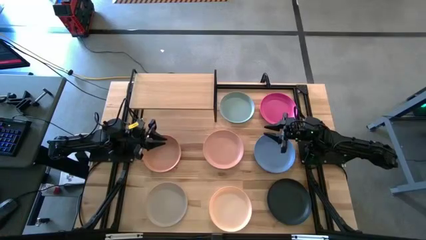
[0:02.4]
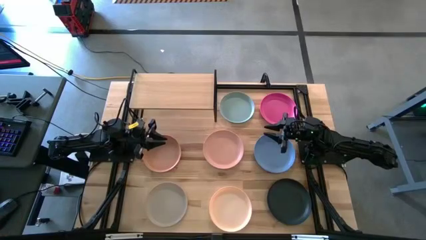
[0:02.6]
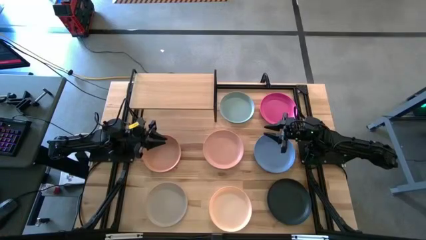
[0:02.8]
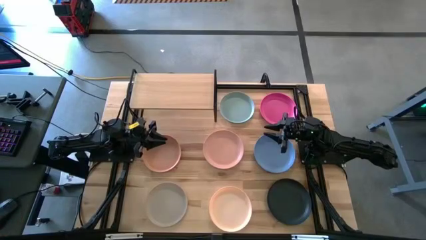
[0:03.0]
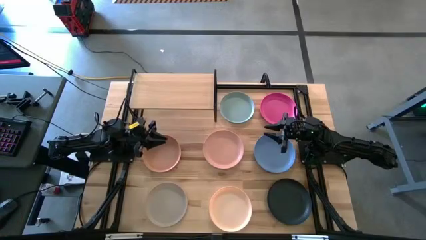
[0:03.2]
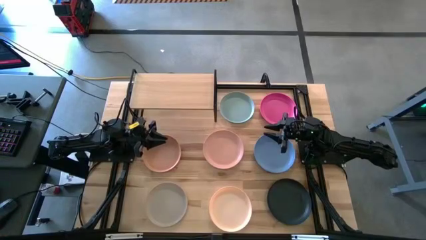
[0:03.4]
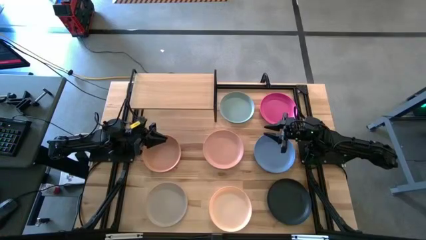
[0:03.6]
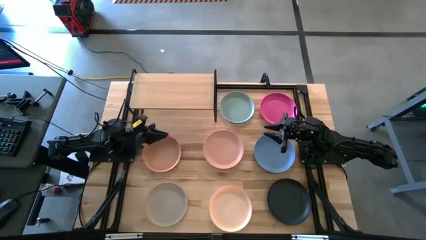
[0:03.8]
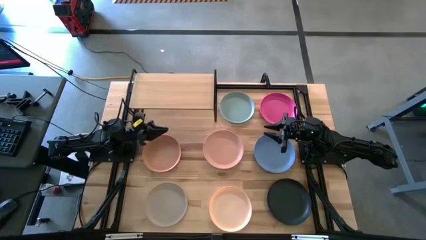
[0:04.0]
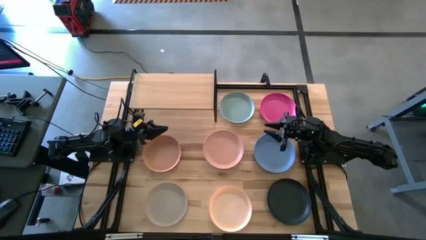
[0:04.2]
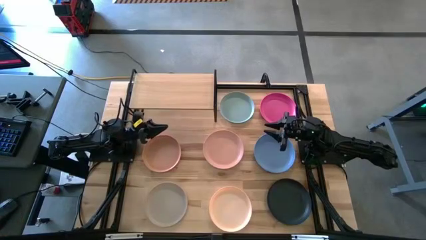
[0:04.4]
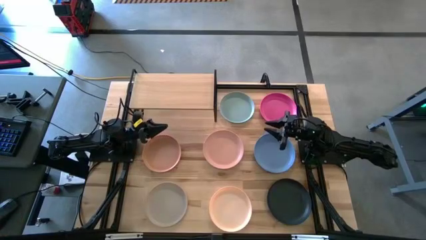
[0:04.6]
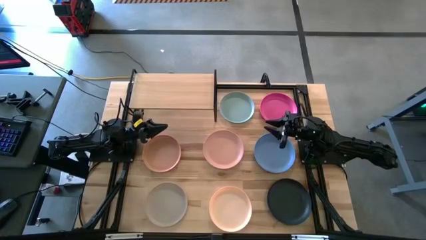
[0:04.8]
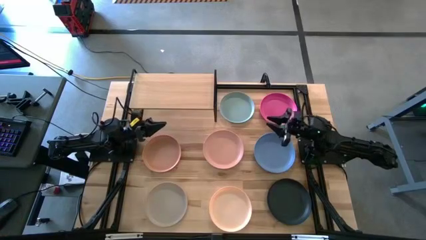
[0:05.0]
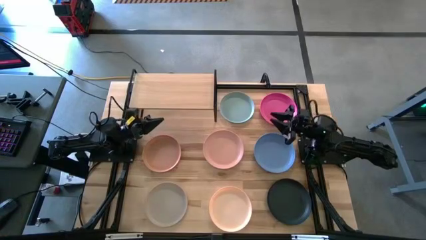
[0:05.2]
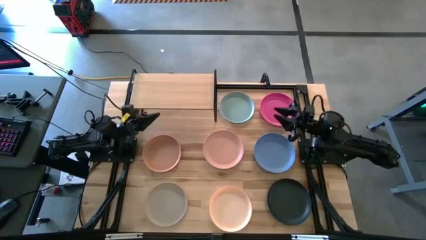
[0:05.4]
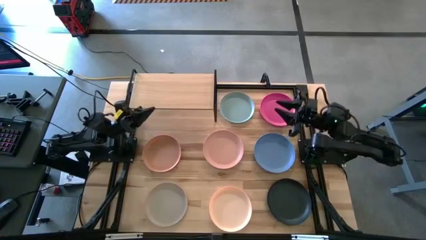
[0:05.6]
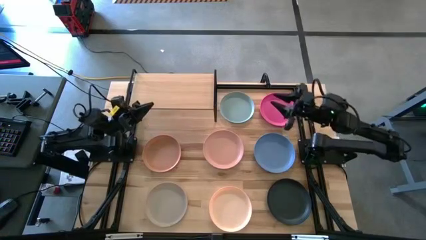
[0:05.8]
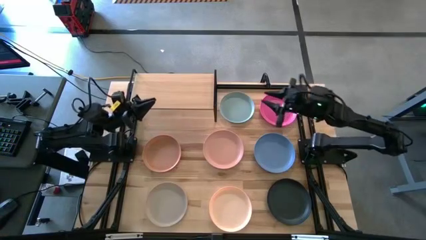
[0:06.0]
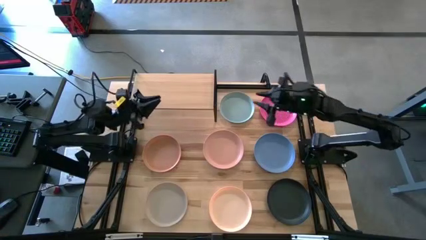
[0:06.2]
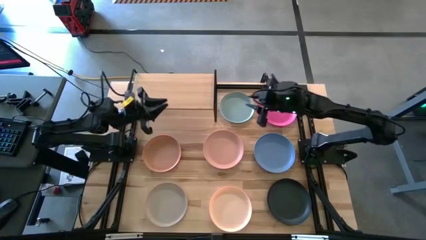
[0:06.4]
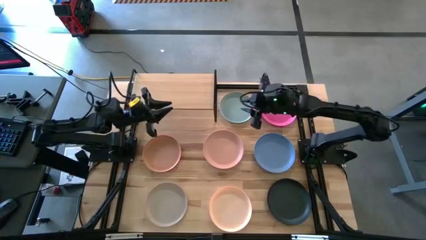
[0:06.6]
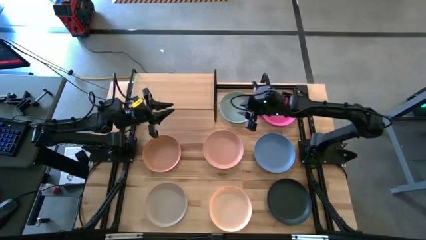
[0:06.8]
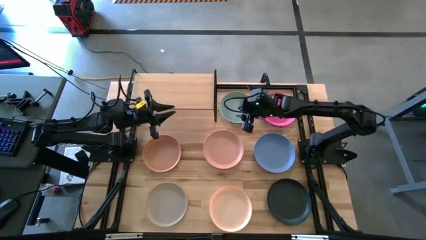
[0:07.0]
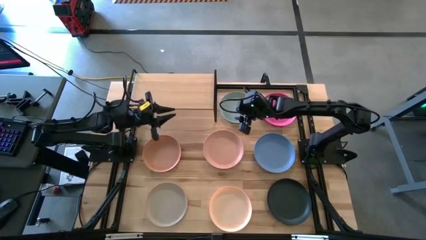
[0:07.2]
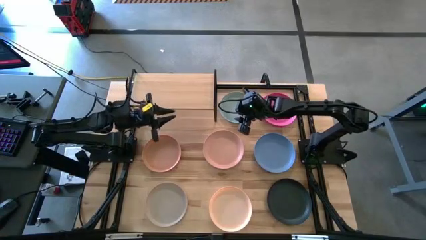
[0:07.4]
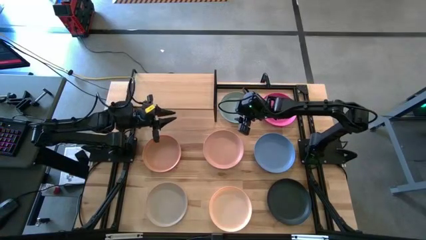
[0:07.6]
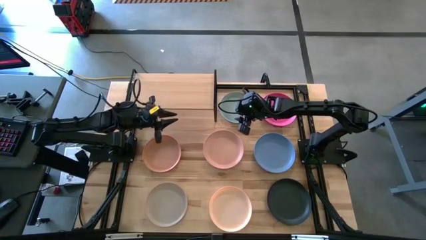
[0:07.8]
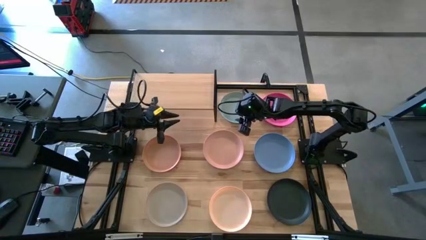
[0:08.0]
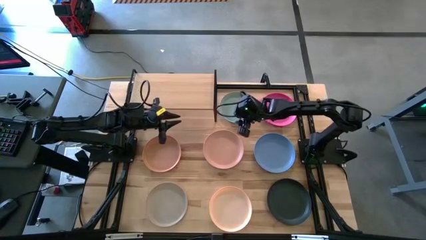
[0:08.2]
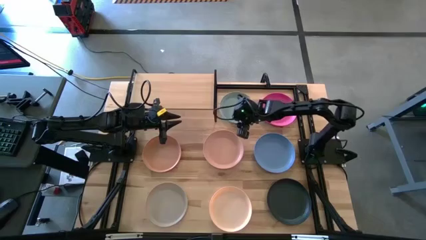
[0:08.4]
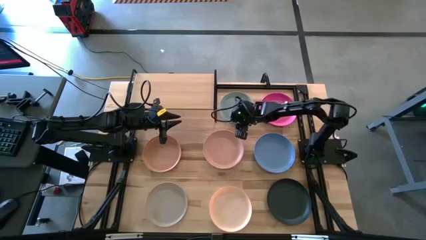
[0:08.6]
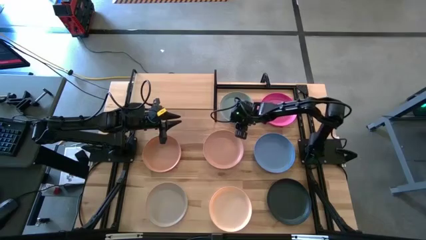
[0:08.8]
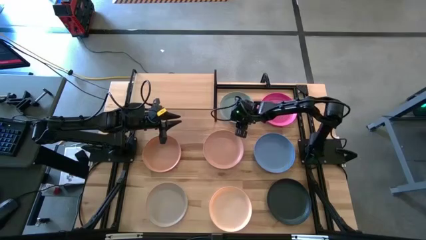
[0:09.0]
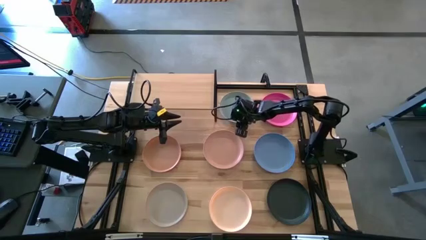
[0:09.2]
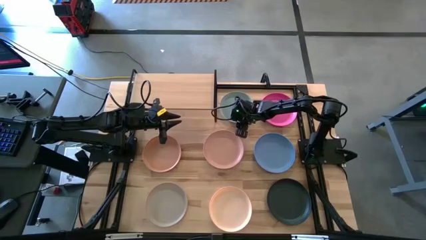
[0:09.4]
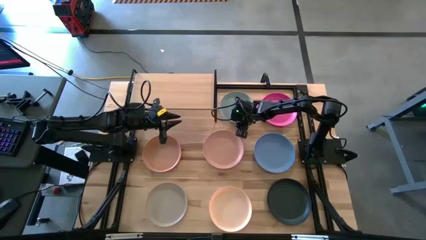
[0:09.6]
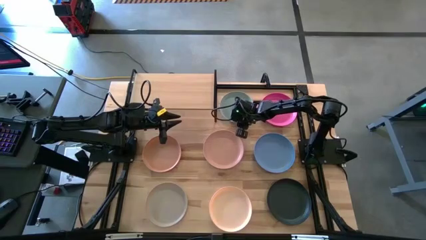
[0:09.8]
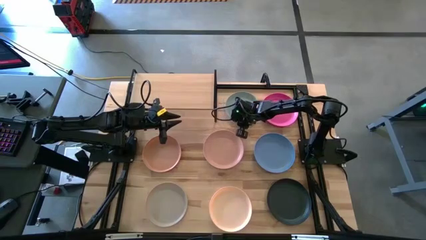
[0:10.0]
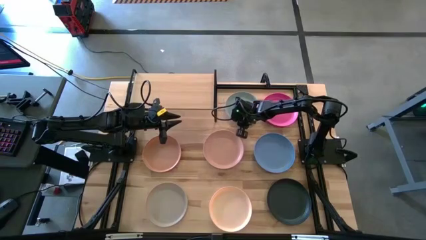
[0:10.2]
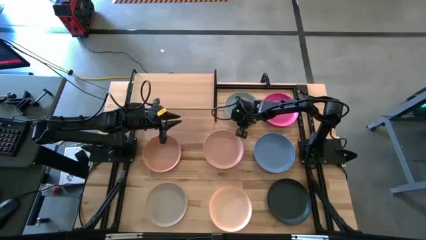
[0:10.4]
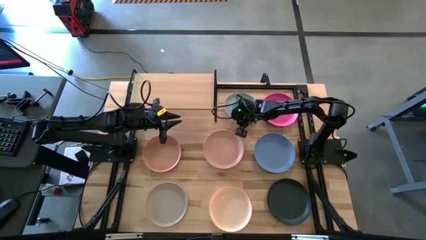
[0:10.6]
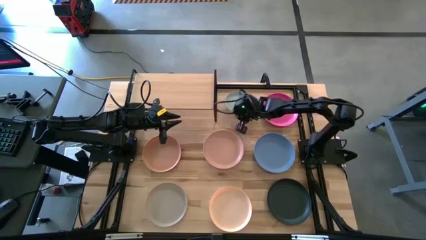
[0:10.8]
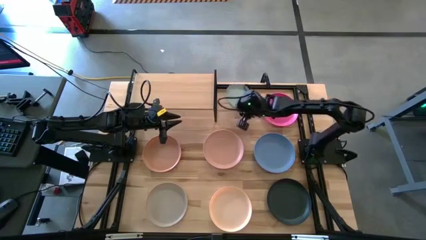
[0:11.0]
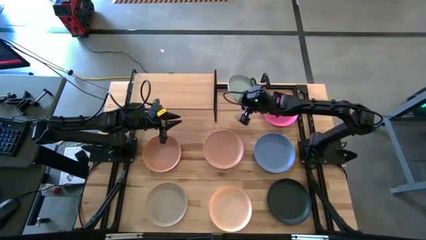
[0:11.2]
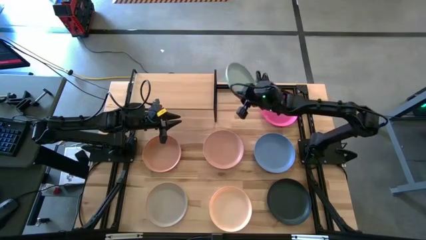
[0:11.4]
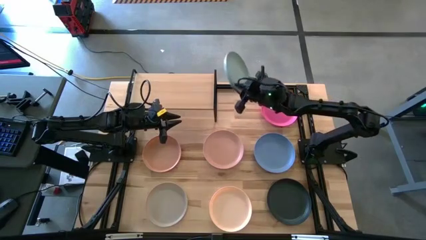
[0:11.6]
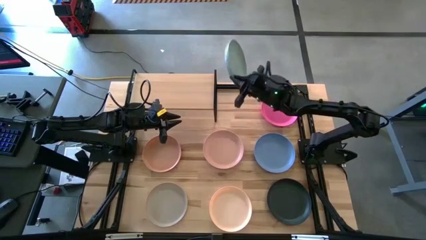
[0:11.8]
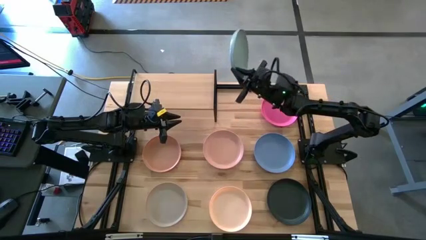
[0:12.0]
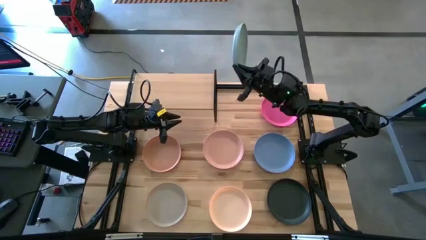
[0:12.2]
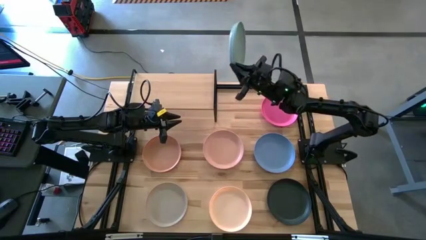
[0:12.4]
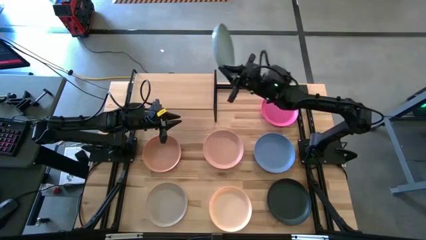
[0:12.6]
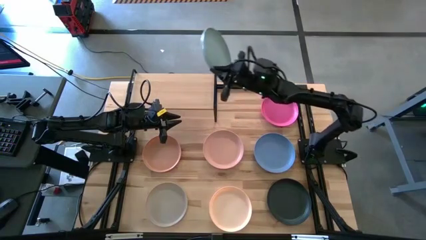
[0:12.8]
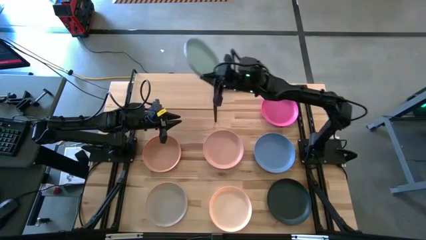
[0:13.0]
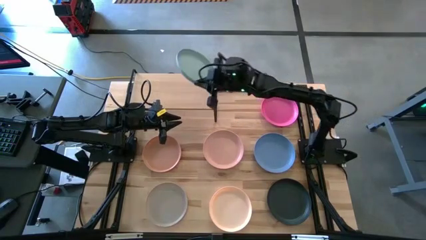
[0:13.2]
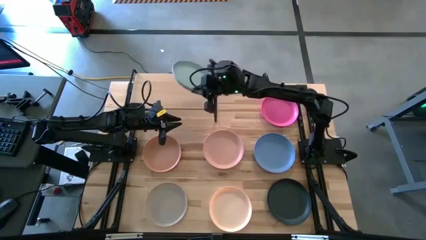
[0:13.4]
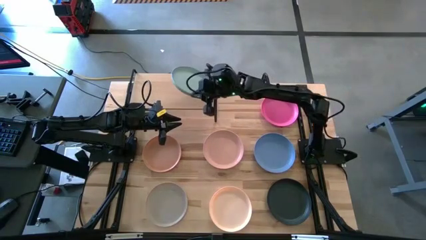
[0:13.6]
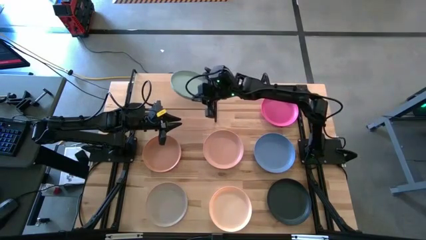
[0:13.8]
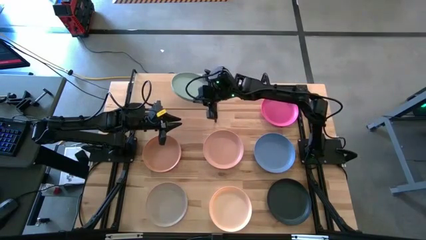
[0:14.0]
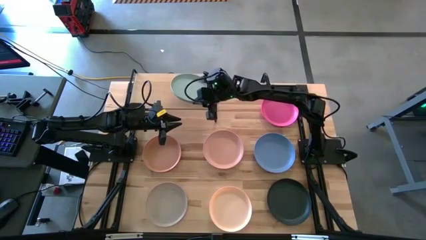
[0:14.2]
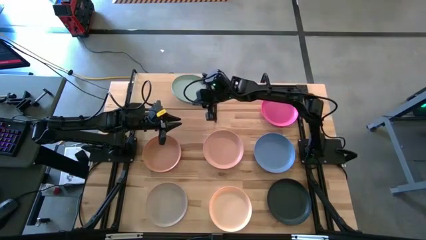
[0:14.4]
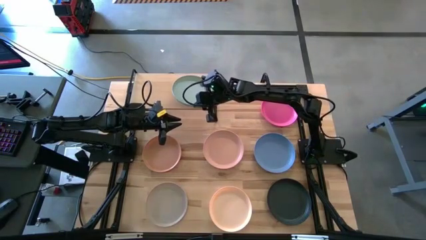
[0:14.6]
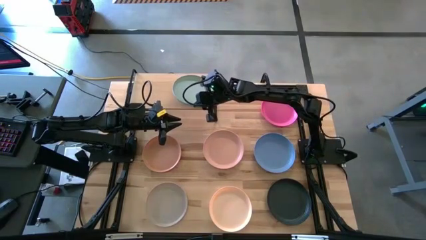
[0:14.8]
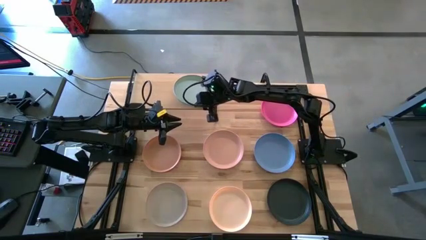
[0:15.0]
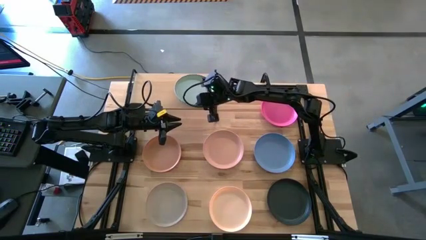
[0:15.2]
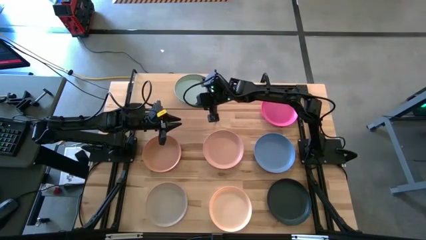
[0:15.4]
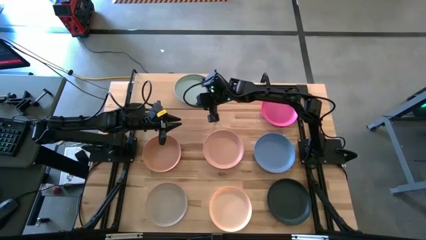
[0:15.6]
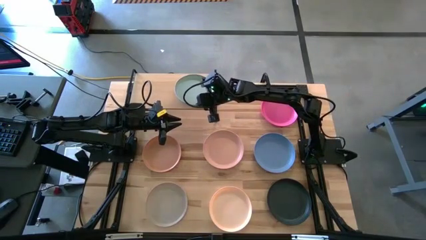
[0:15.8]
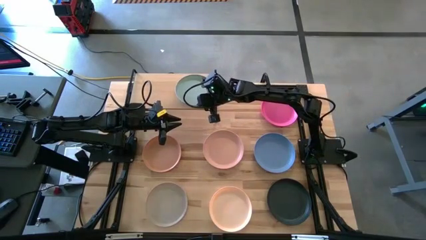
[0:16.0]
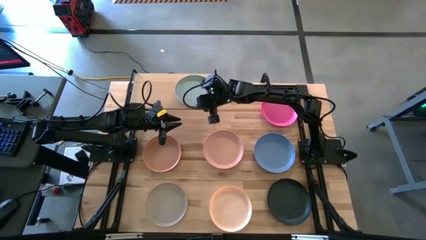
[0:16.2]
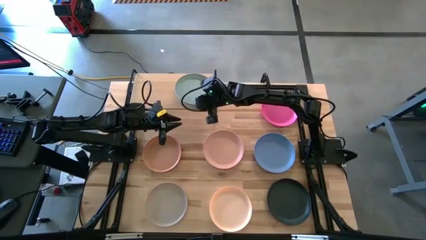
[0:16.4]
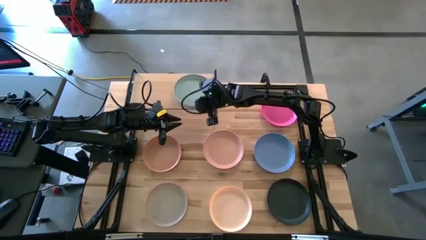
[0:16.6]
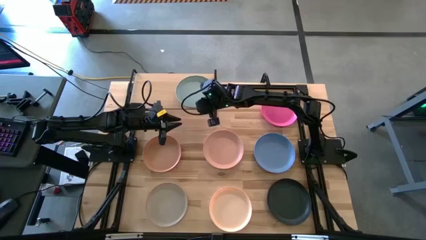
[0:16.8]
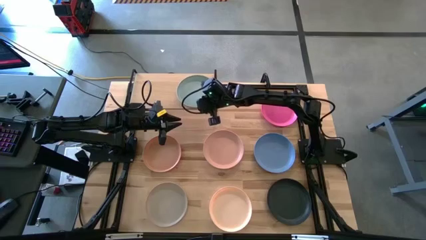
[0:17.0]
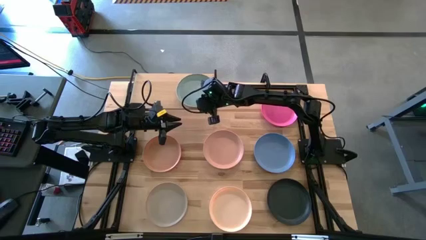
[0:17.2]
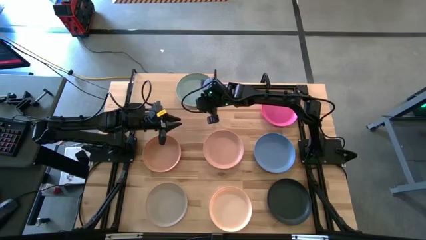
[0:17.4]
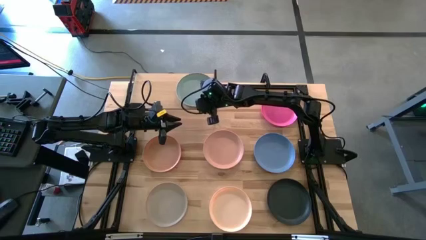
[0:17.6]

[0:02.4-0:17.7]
Task: Place and stack plates onto a shelf
Put the blue plate on the shelf
